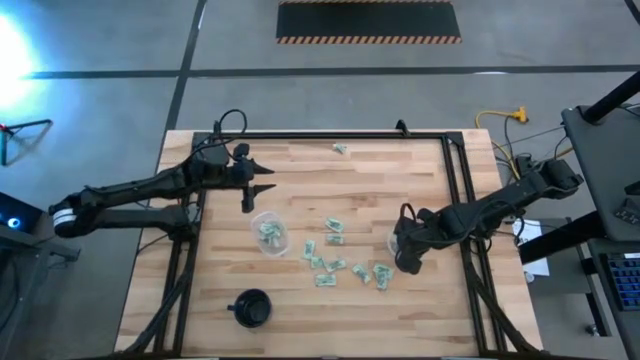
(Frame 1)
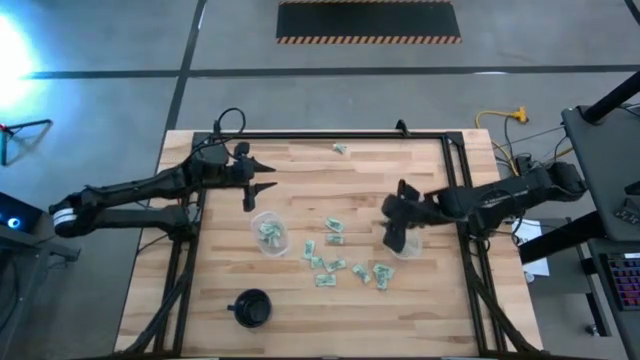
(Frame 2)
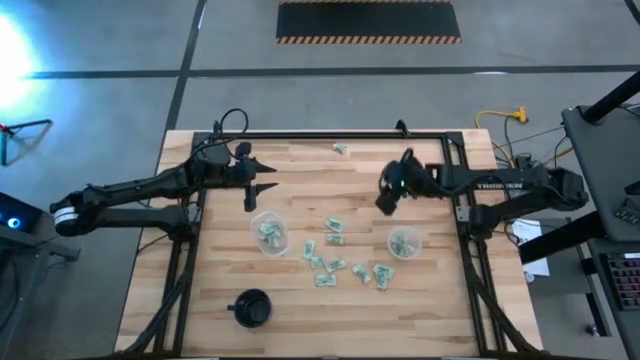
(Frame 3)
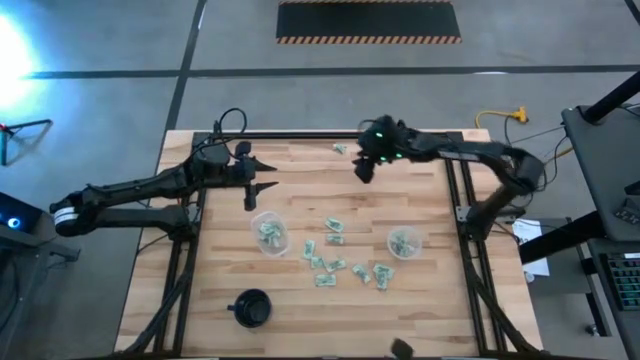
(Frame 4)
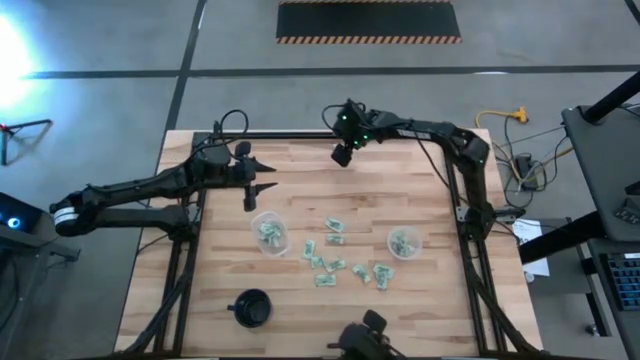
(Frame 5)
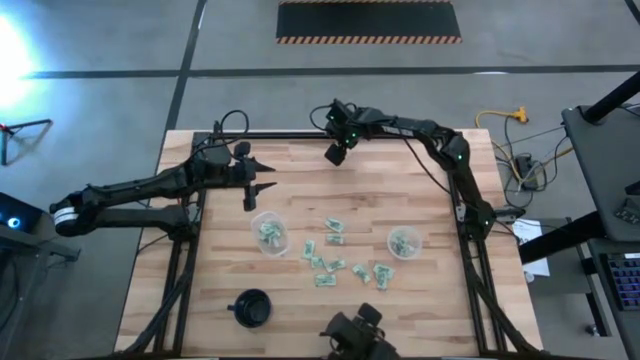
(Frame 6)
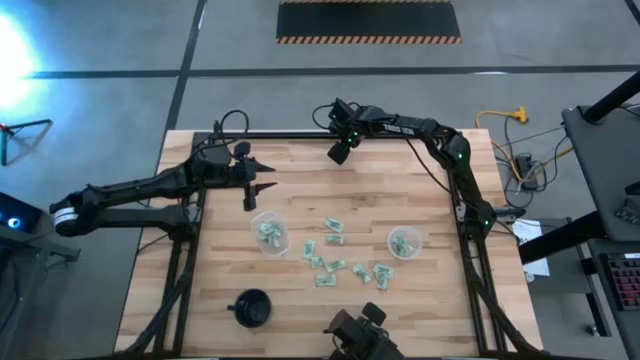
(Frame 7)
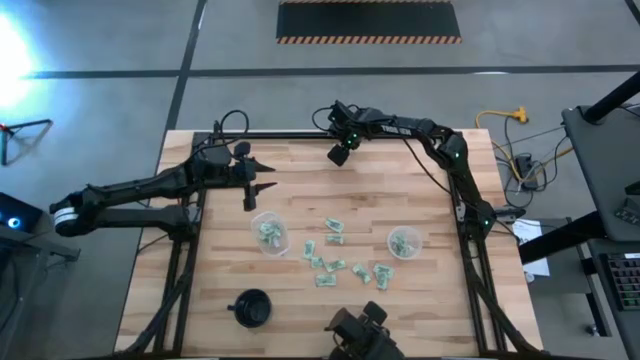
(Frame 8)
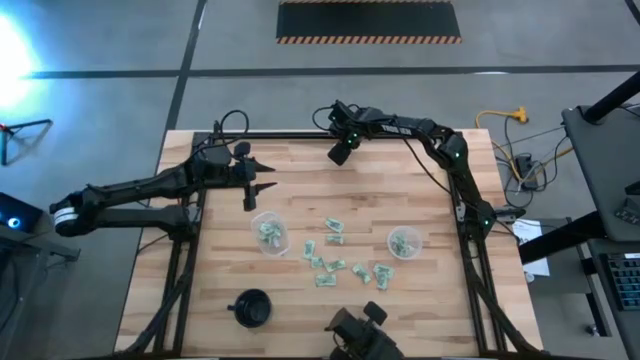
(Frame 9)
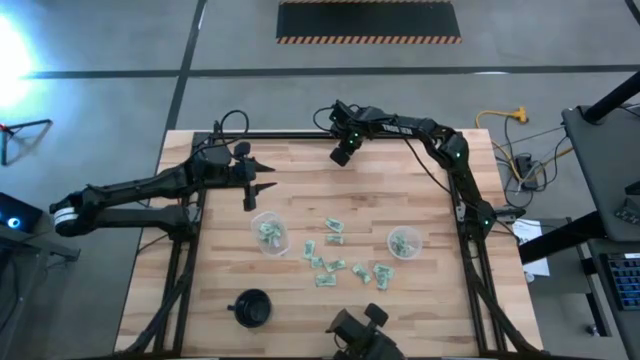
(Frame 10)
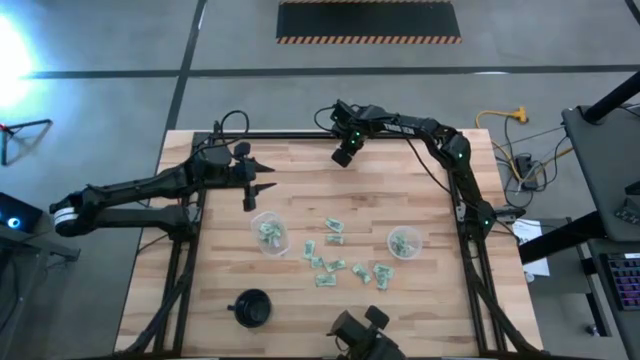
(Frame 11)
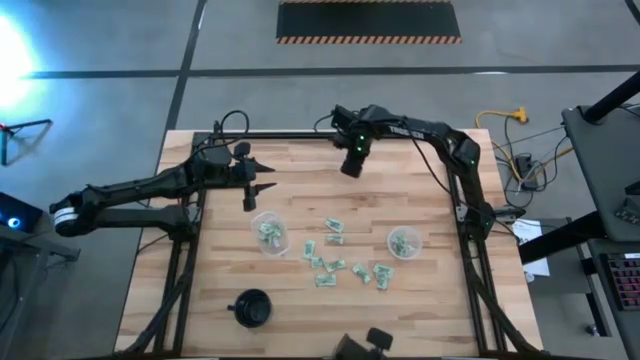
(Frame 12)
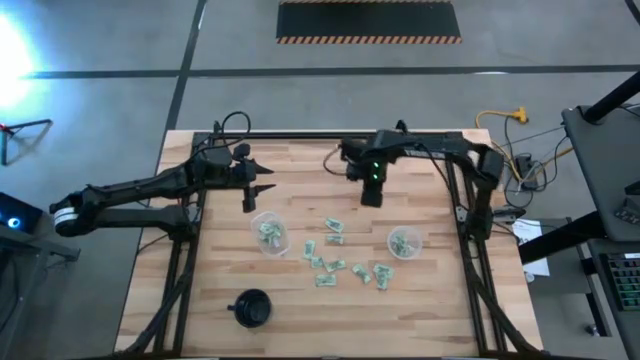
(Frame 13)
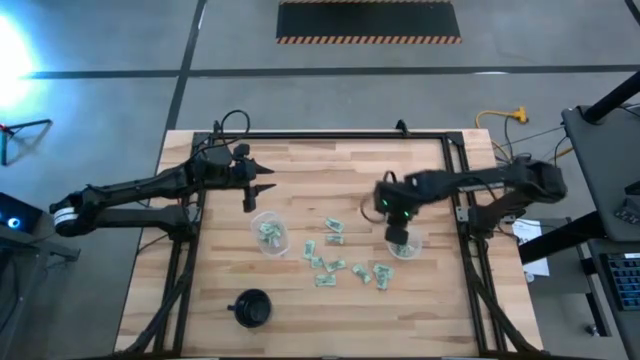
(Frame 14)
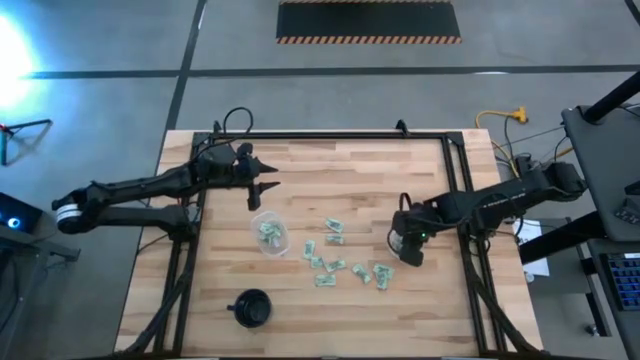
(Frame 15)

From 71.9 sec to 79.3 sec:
Task: Pick and place Stevia / Truvia into bins
Put the stevia packet into the round transparent container

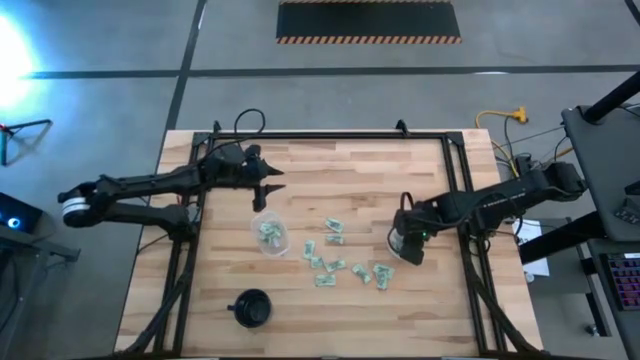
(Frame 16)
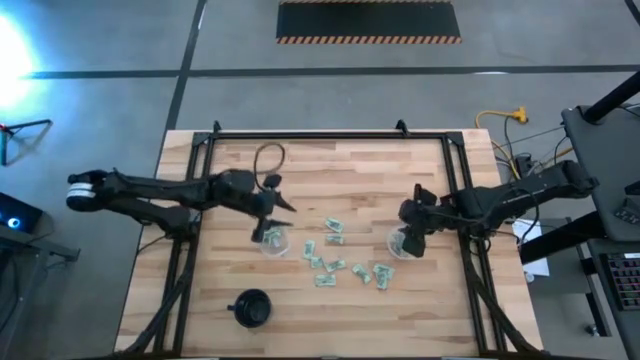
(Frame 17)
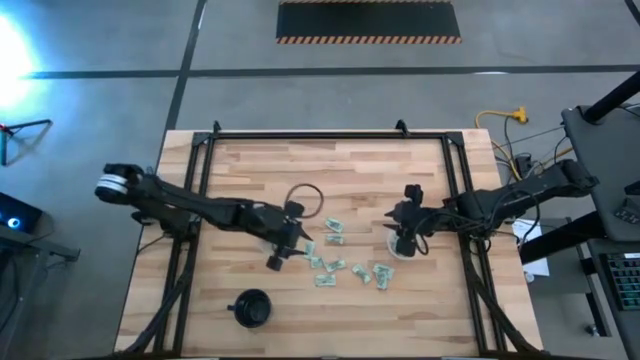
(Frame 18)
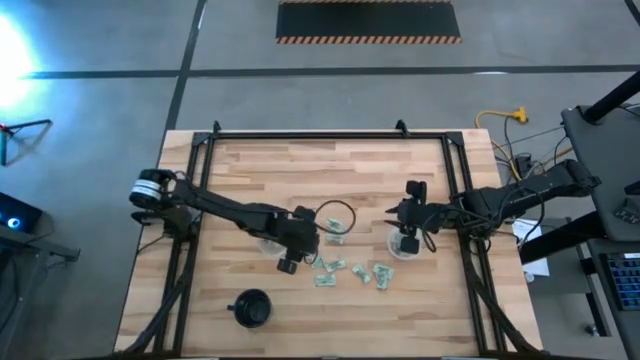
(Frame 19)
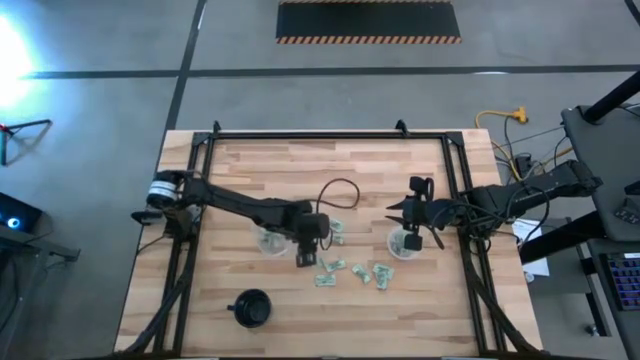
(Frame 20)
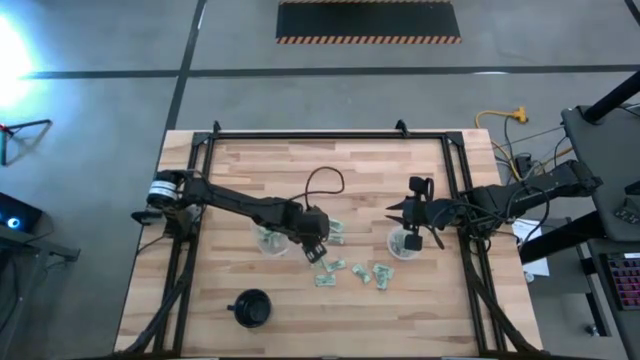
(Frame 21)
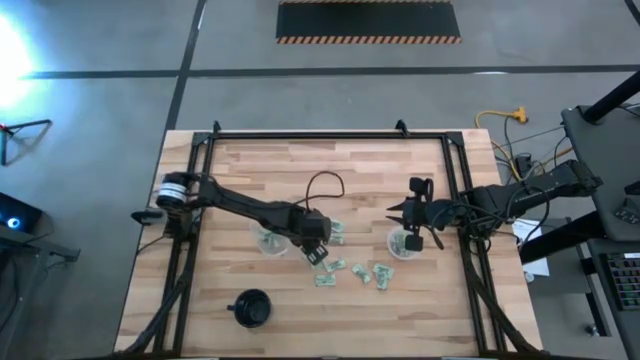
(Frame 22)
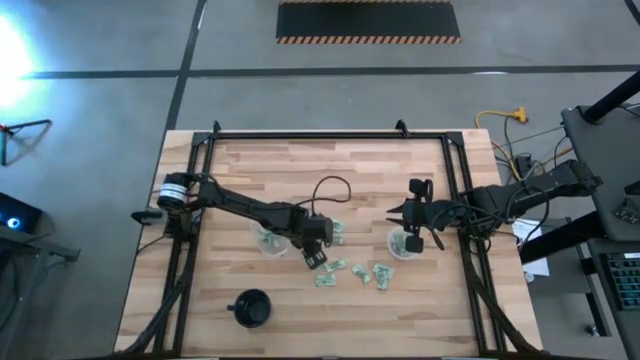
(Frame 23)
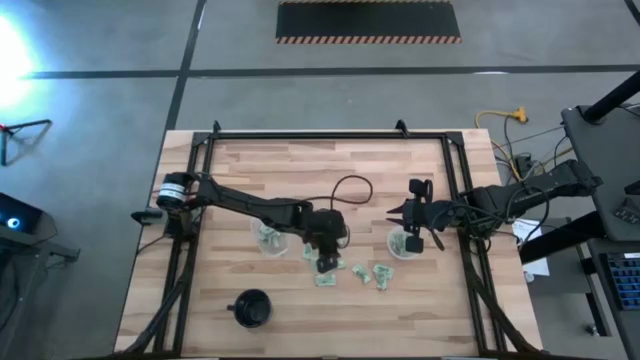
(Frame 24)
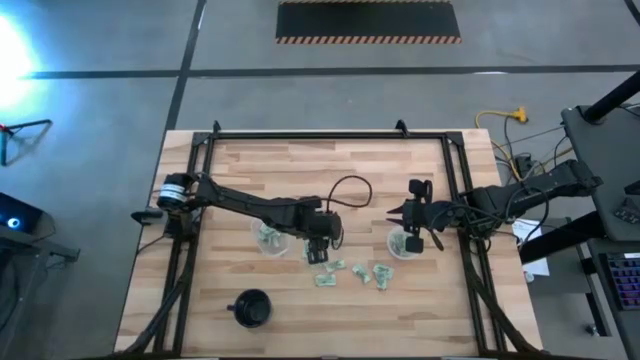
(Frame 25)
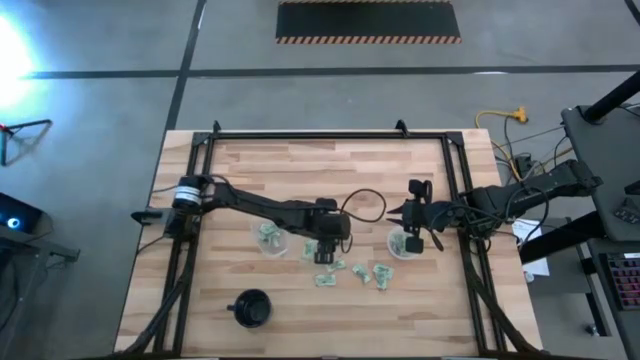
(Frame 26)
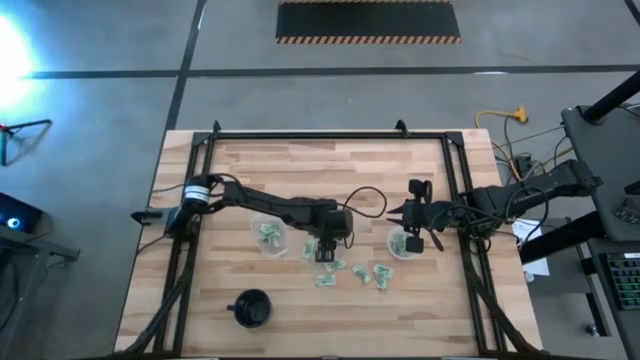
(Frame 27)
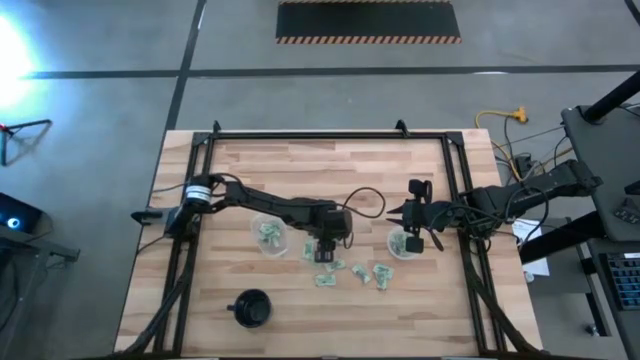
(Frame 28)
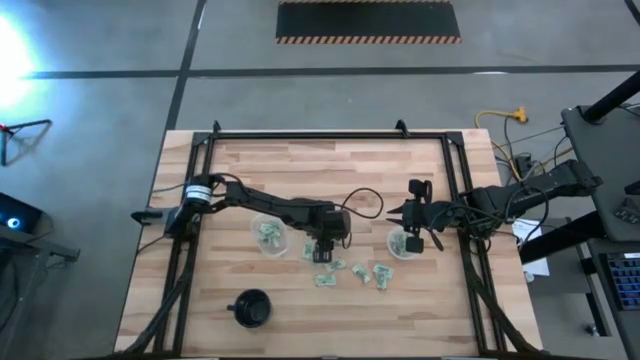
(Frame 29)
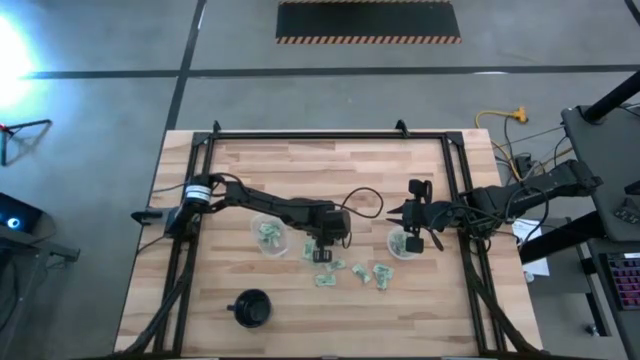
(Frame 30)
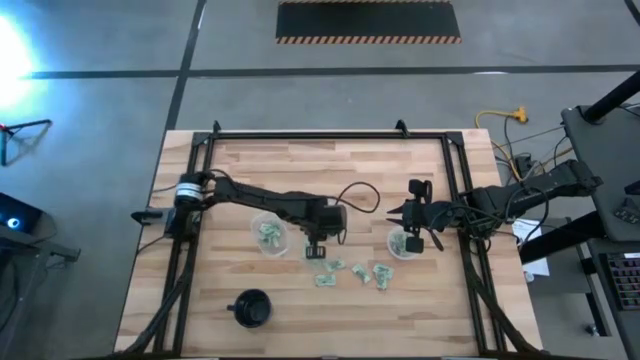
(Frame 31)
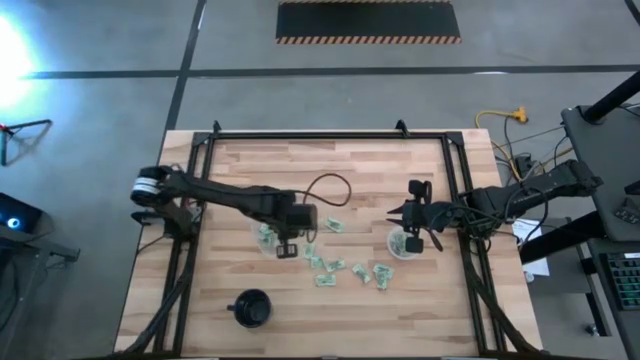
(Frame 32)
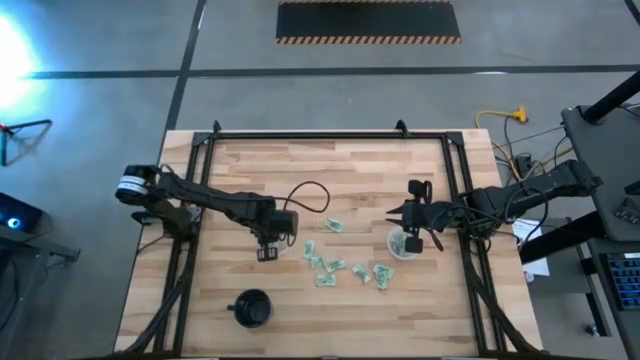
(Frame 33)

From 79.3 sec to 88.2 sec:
Put the stevia packet into the oval transparent container

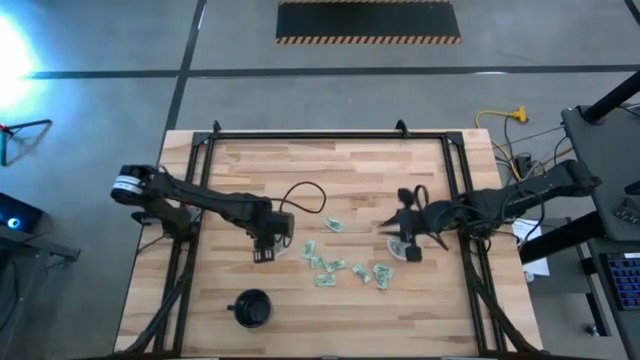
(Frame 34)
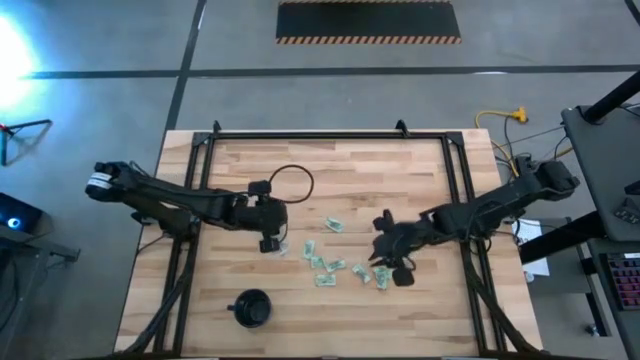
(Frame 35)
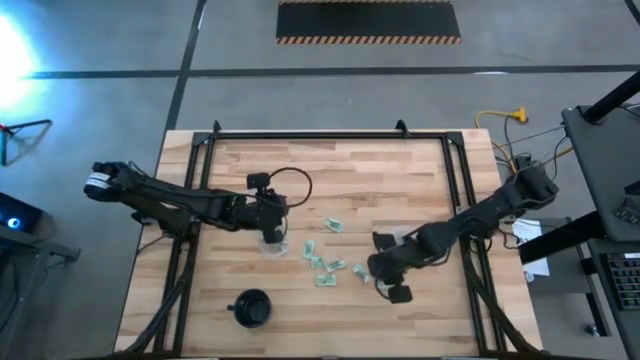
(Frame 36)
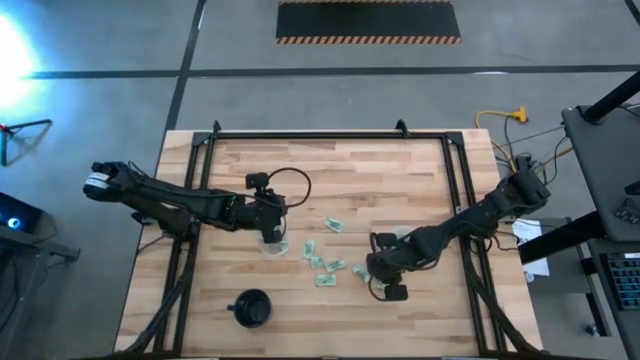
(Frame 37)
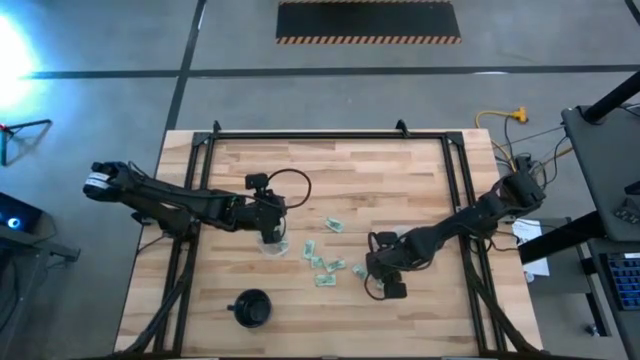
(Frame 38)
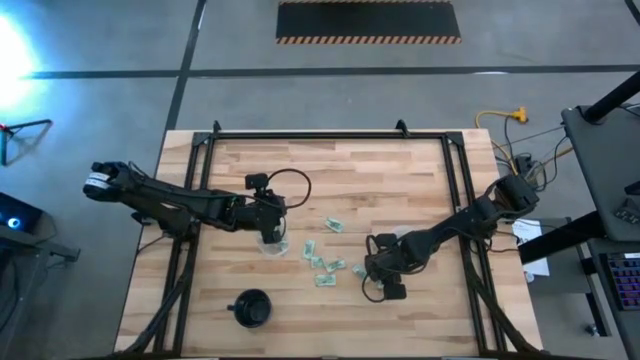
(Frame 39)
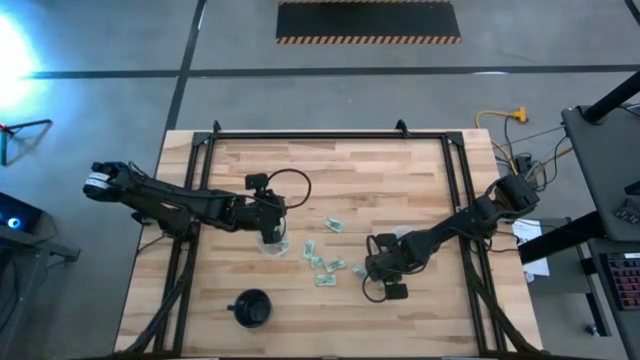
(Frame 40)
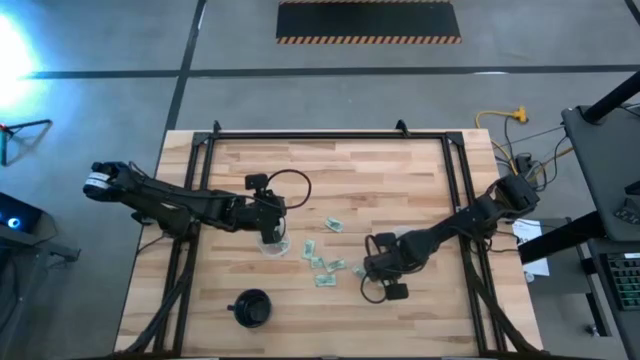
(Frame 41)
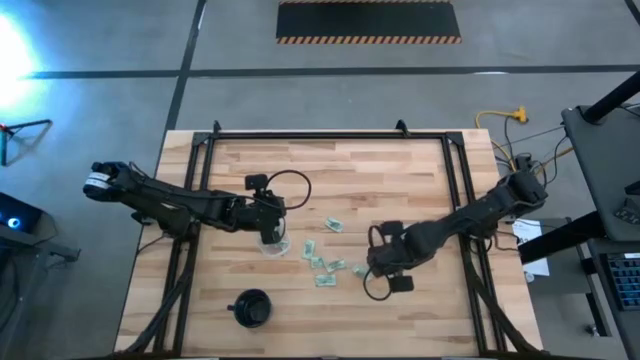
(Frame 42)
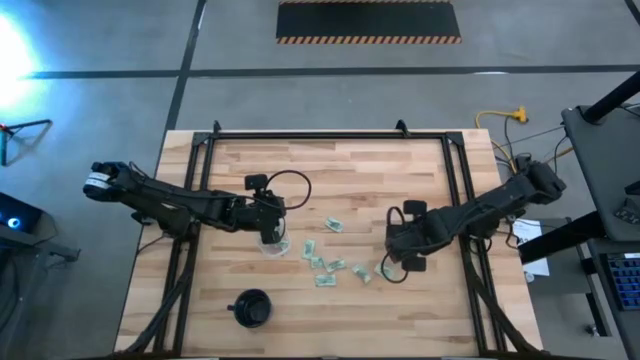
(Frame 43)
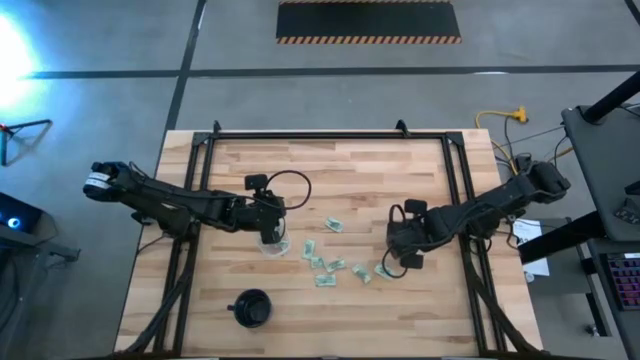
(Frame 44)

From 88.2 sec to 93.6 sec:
Put the stevia packet into the round transparent container
